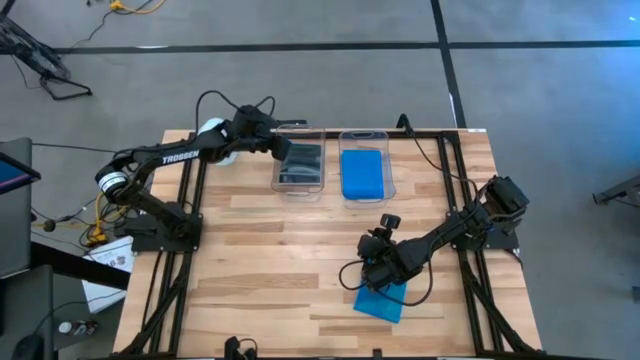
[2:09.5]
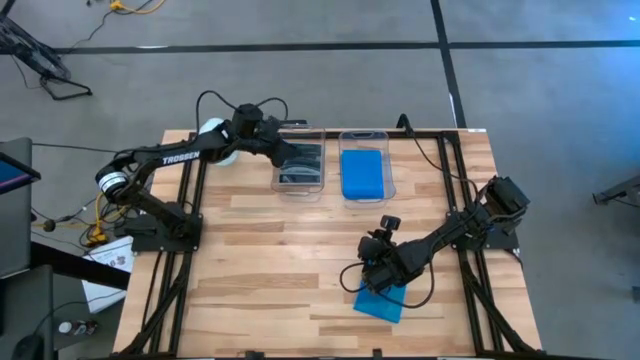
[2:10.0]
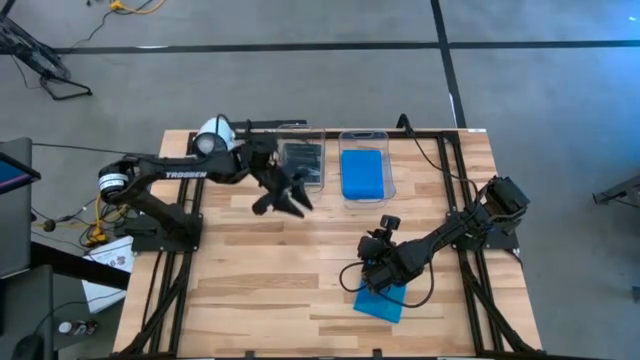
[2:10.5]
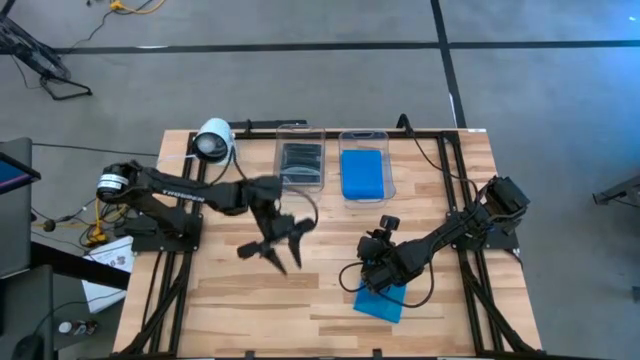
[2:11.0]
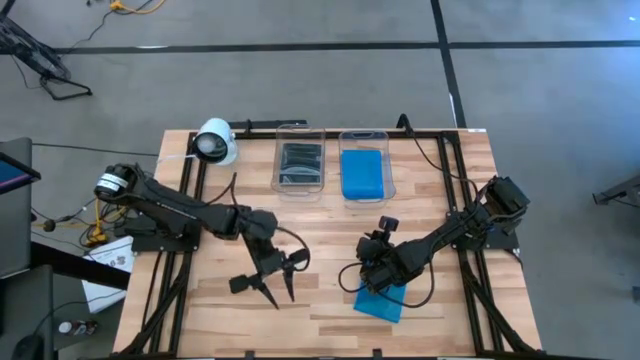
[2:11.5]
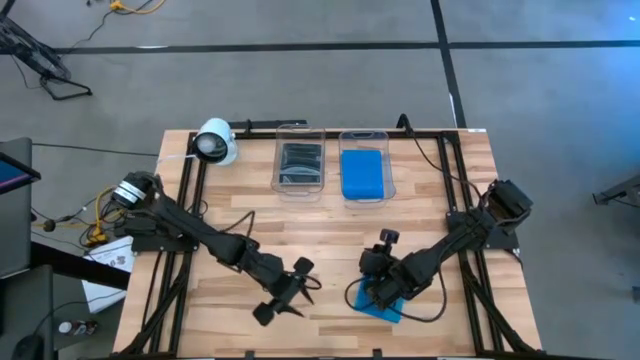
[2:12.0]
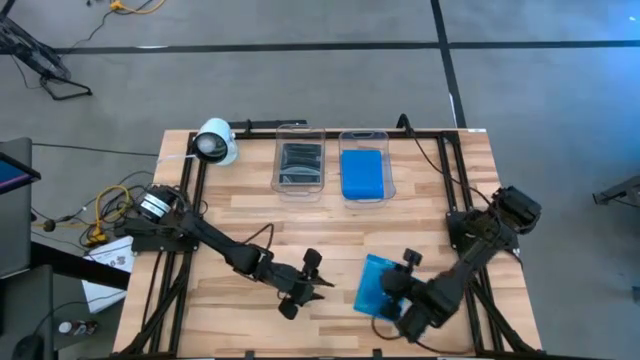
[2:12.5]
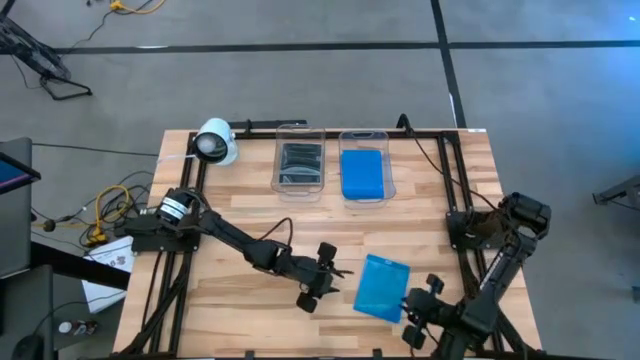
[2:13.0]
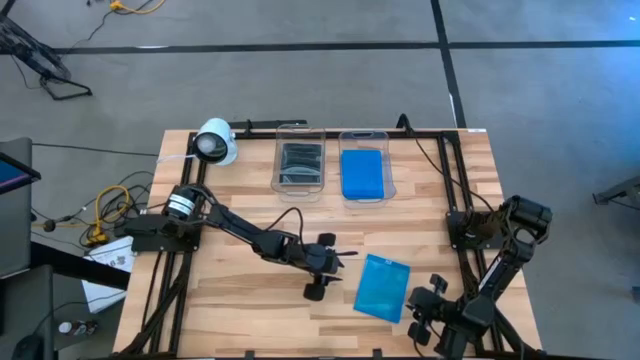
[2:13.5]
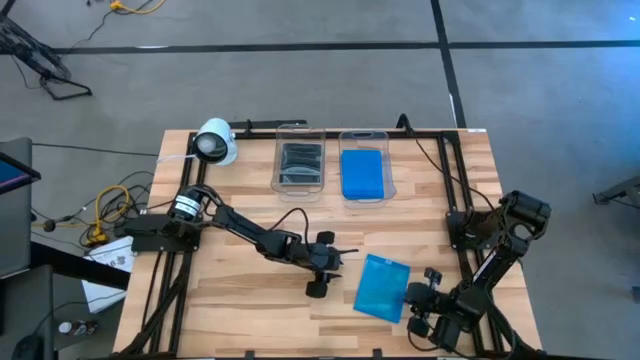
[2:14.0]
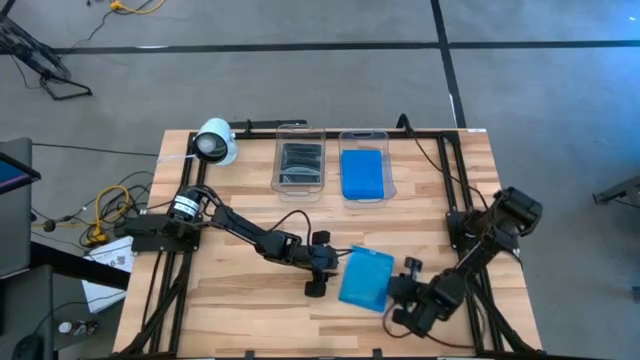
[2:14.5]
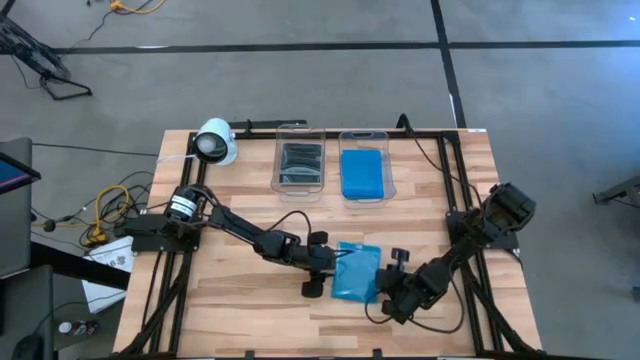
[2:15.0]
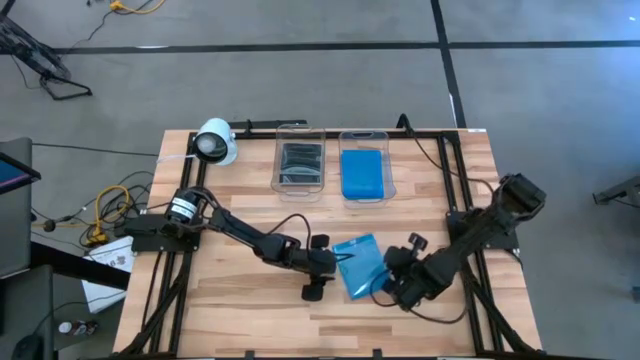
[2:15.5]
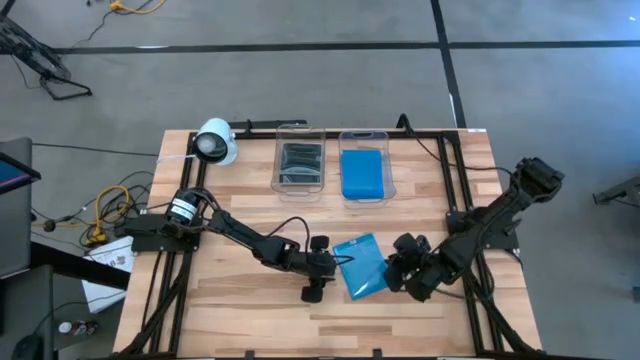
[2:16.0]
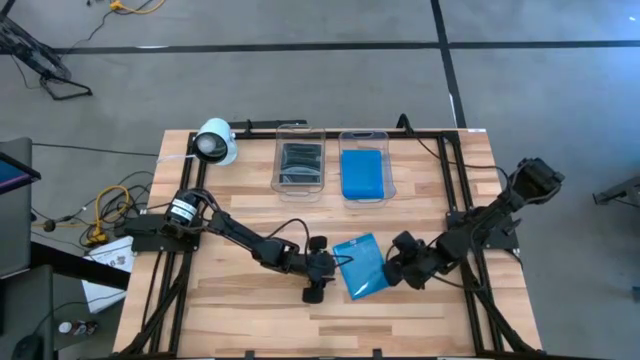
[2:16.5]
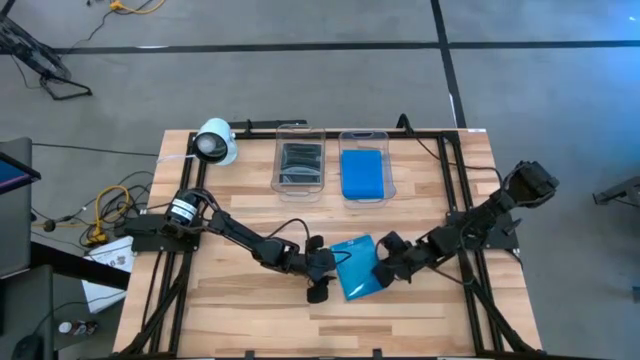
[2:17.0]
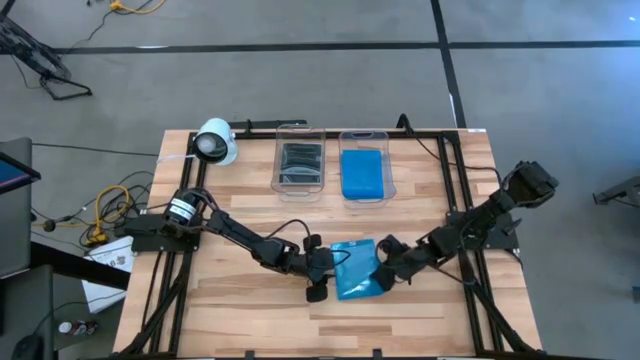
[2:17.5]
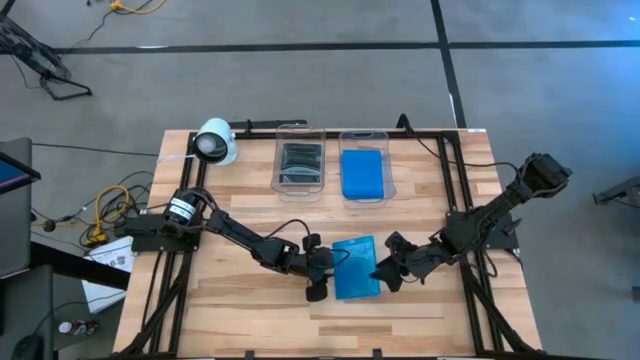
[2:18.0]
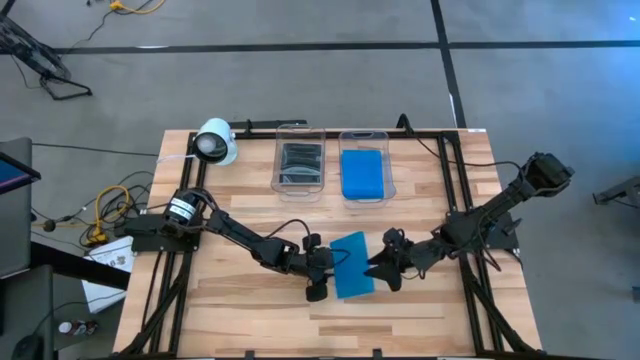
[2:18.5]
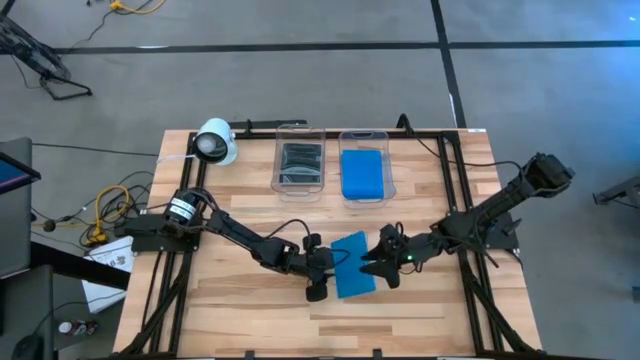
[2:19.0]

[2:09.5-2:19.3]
Task: Pick & place jewel cases by type
Put the blue CD case into the right transparent bin

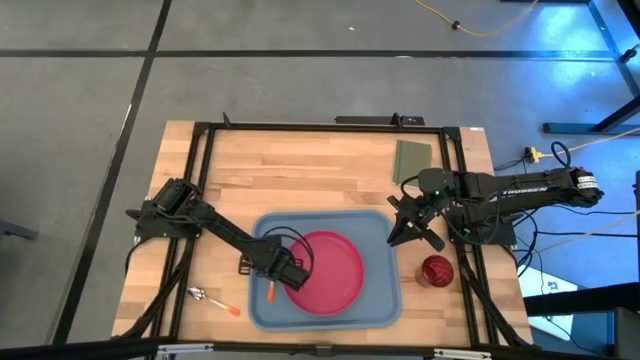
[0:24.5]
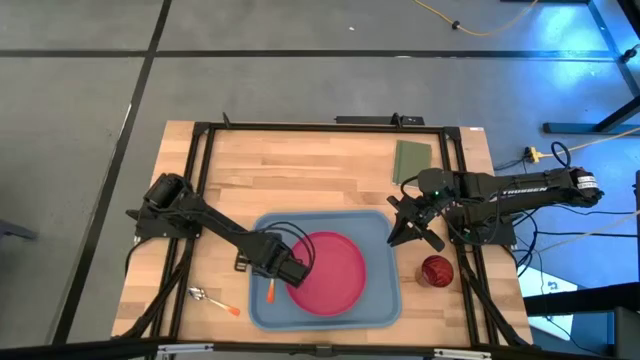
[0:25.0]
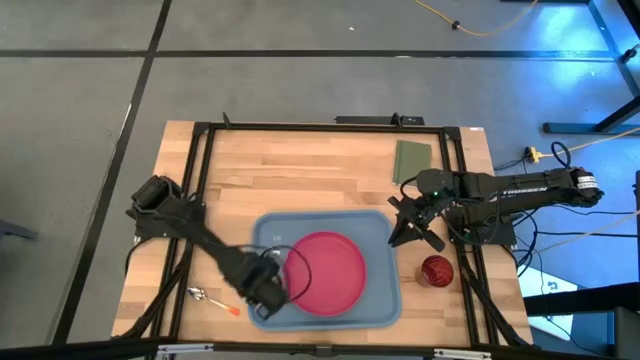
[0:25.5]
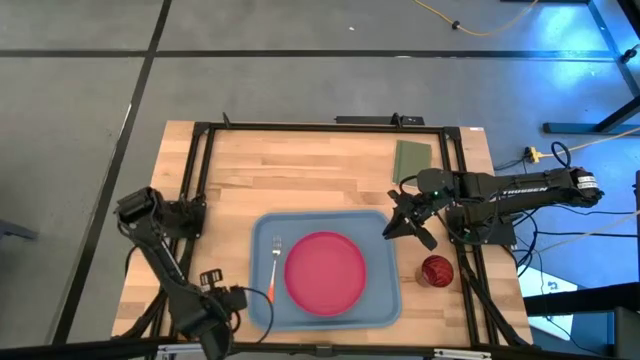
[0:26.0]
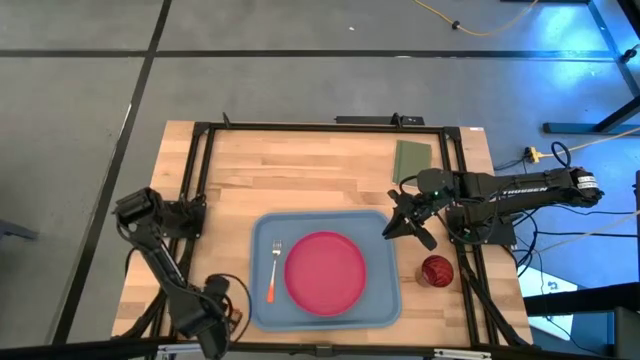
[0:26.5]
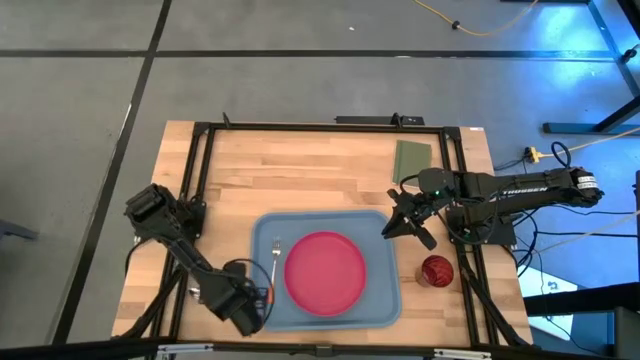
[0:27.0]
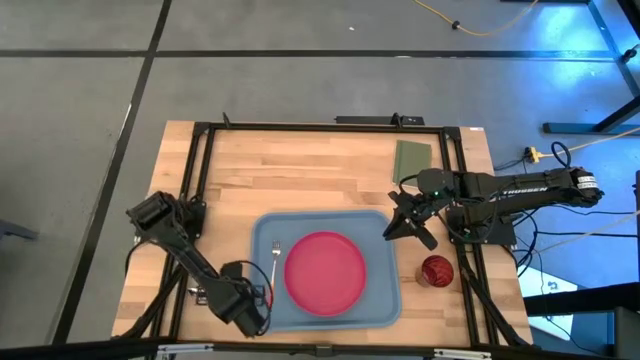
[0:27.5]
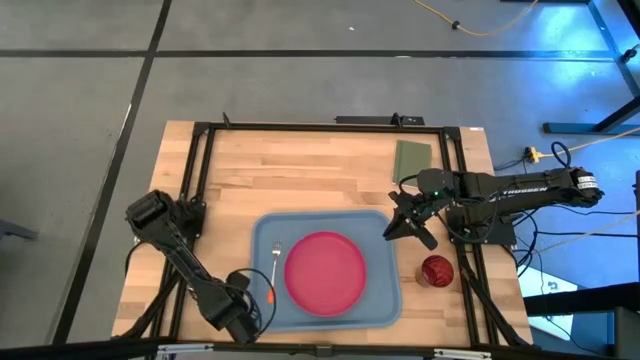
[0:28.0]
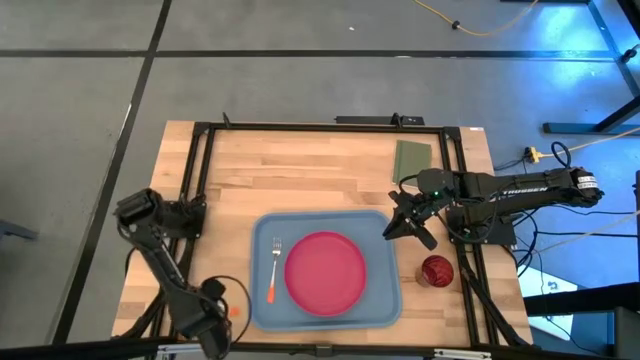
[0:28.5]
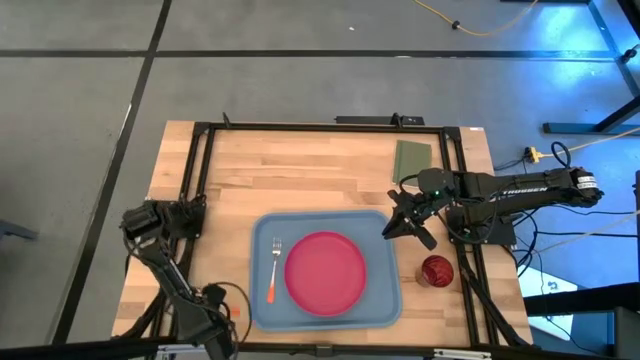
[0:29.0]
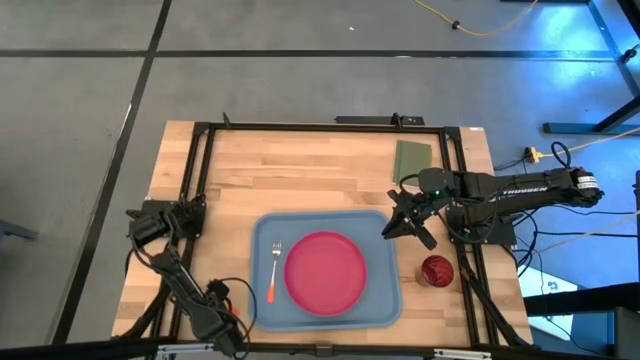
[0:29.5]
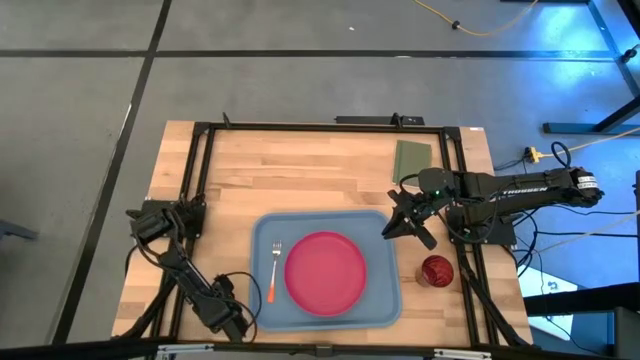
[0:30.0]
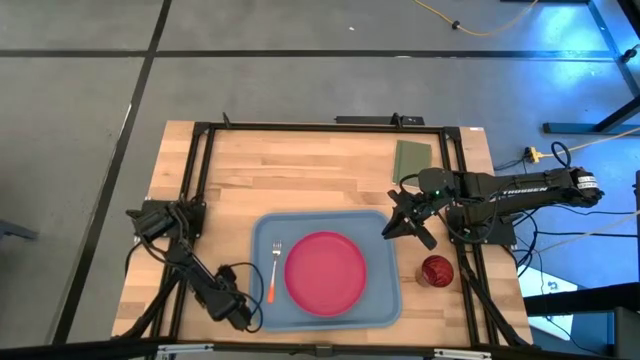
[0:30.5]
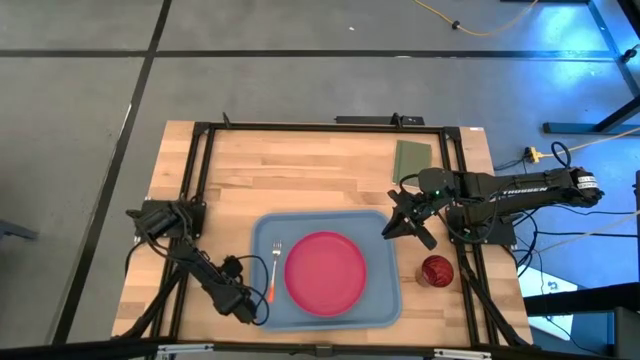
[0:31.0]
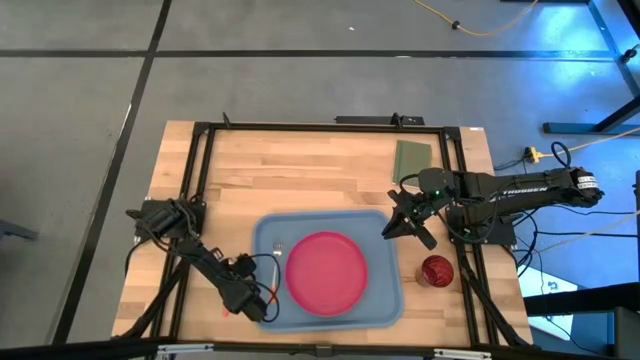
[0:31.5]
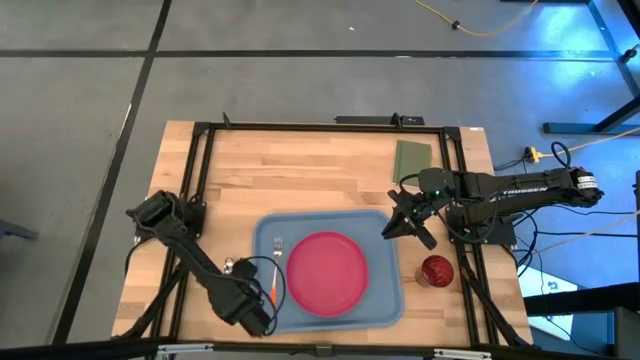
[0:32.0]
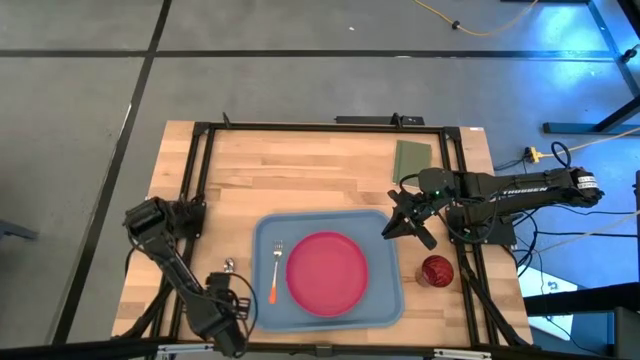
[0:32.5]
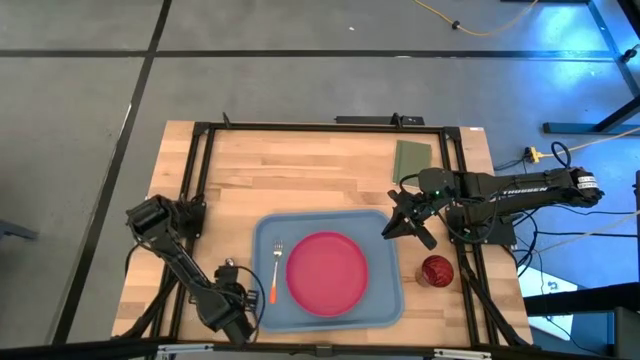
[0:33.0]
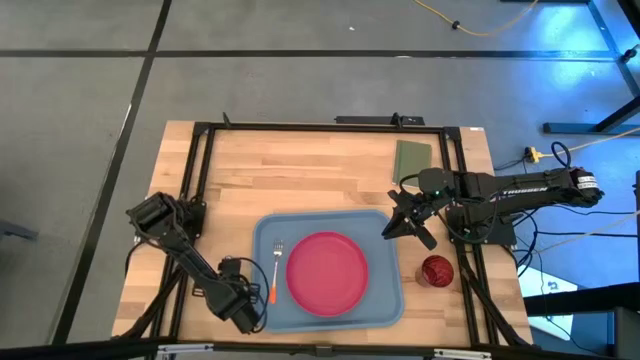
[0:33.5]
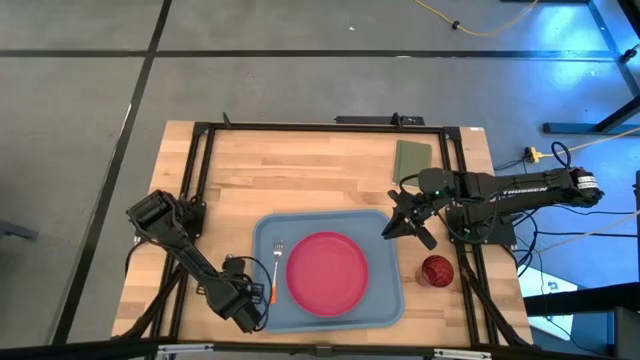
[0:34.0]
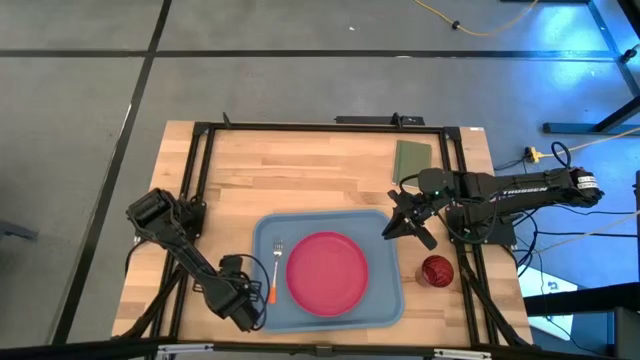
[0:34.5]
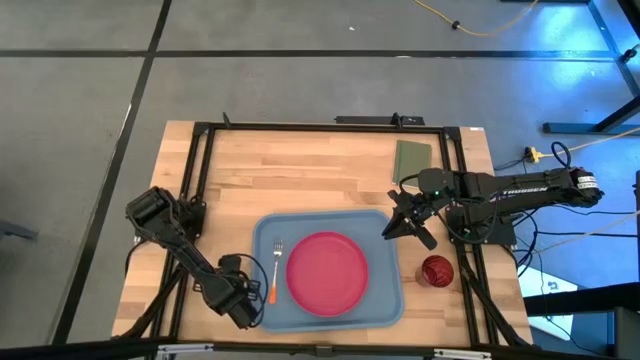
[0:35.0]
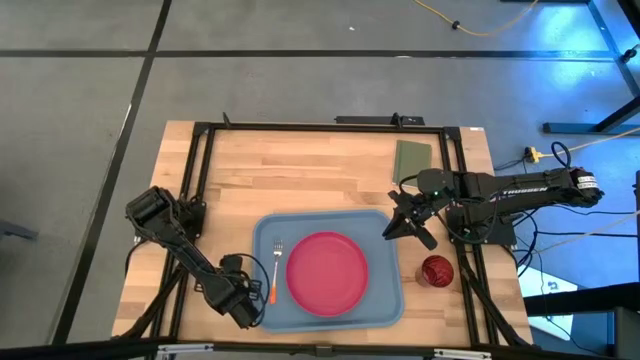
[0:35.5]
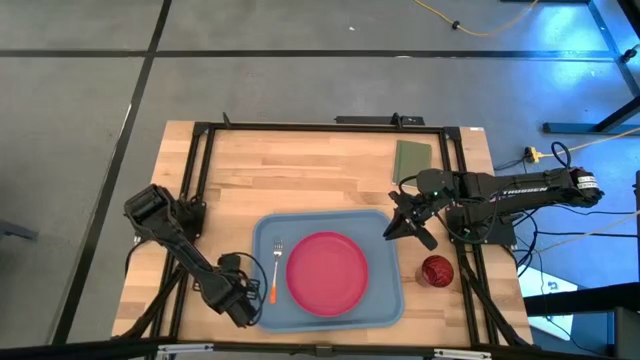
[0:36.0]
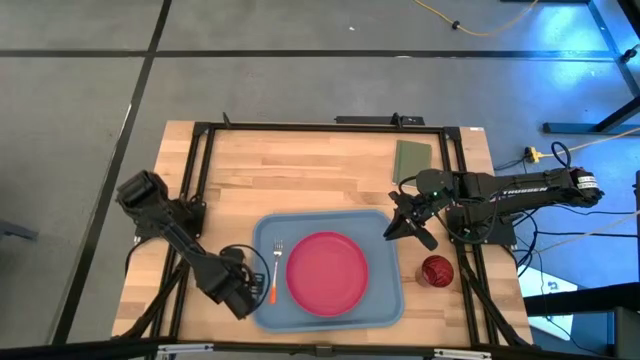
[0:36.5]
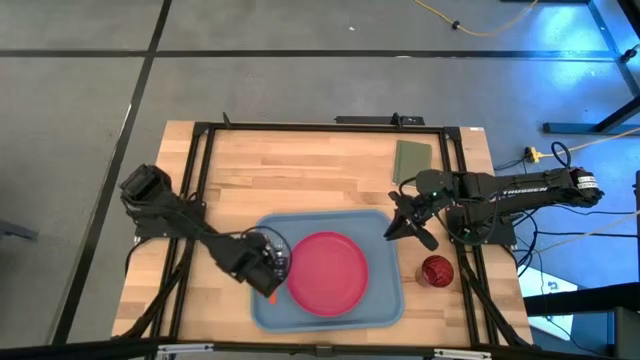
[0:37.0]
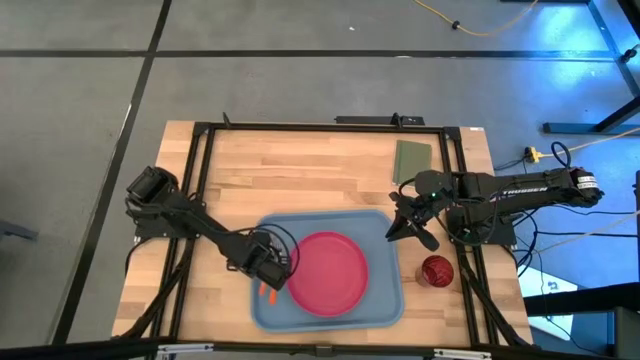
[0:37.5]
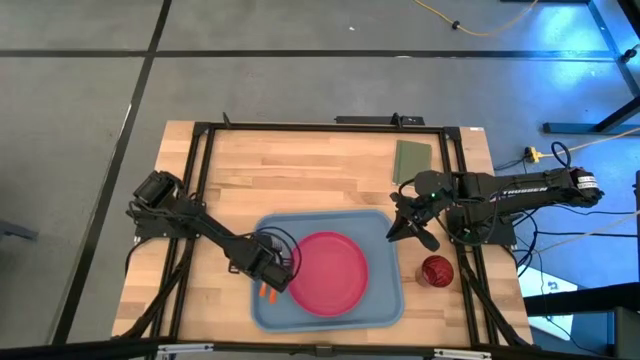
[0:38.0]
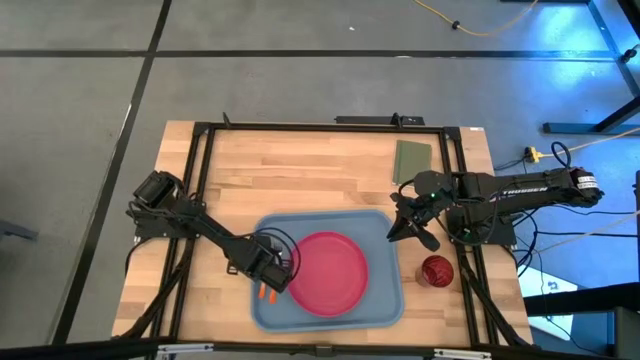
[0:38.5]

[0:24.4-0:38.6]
Task: Pick and place plate/cup/fork/spoon on tray
Put the orange spoon on the blue serving tray to the left side of the orange spoon
